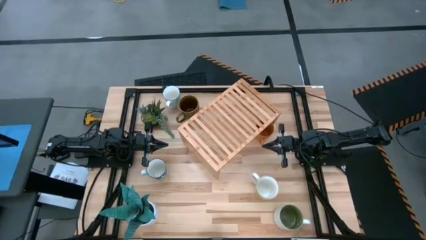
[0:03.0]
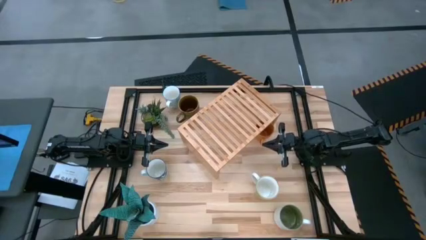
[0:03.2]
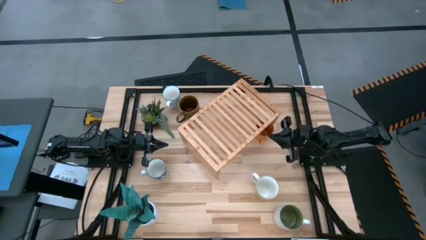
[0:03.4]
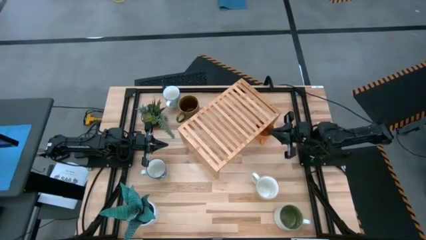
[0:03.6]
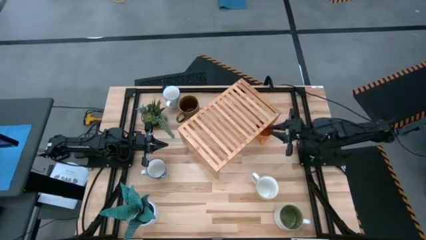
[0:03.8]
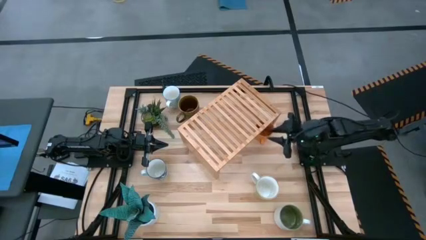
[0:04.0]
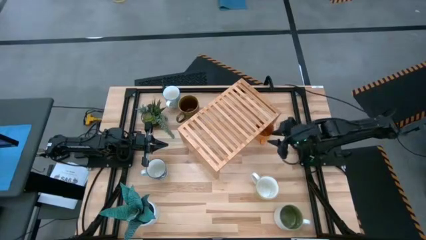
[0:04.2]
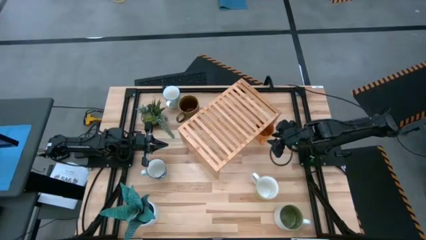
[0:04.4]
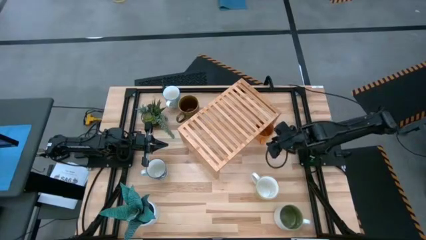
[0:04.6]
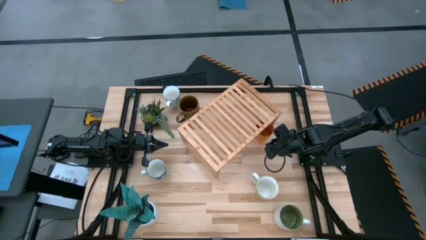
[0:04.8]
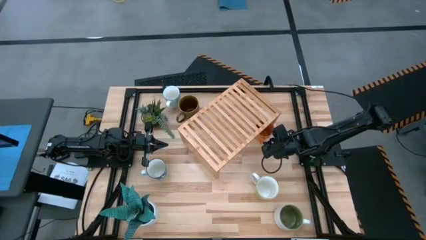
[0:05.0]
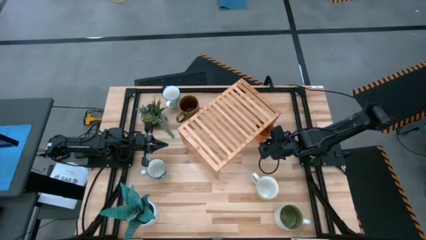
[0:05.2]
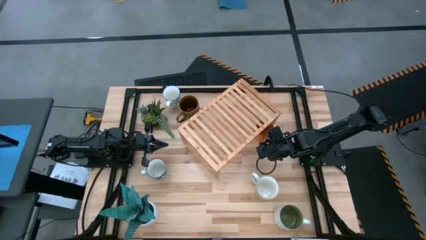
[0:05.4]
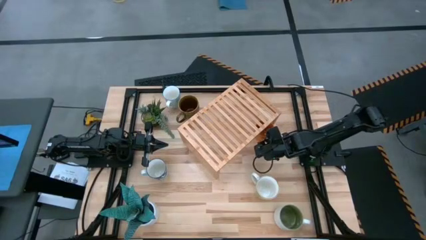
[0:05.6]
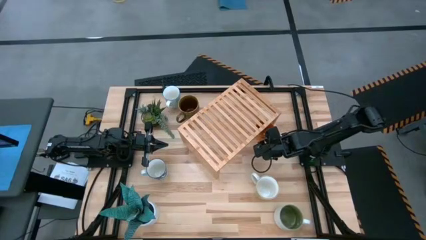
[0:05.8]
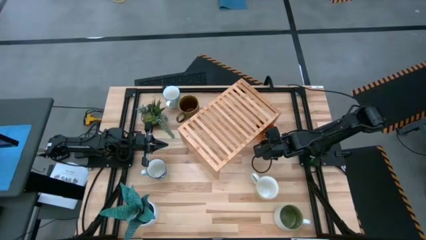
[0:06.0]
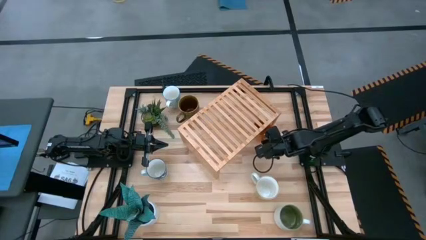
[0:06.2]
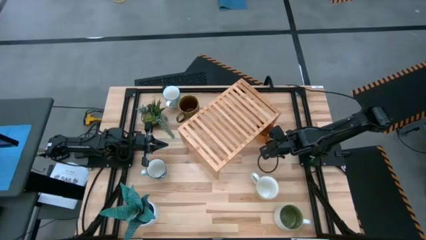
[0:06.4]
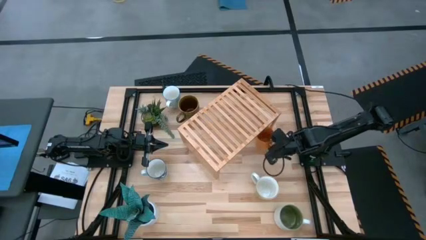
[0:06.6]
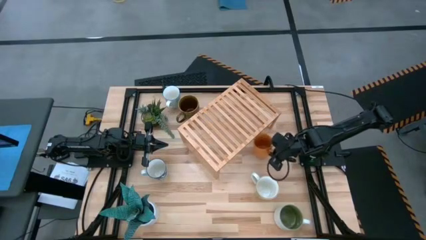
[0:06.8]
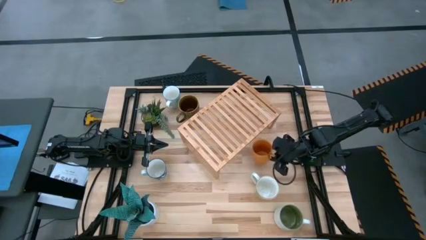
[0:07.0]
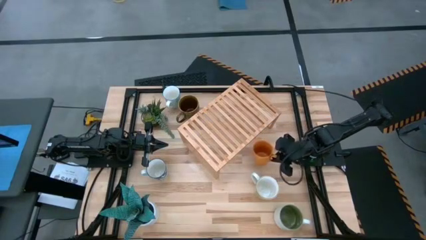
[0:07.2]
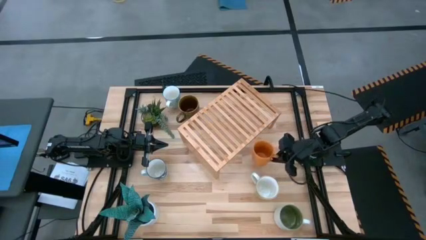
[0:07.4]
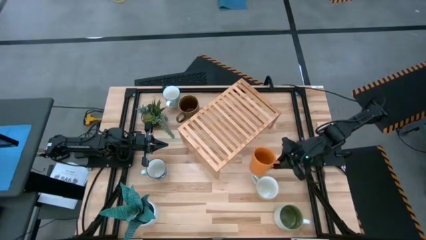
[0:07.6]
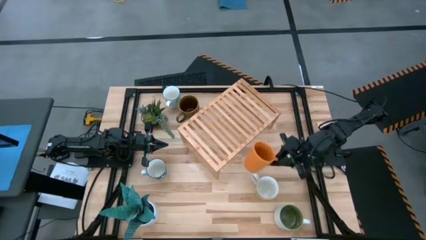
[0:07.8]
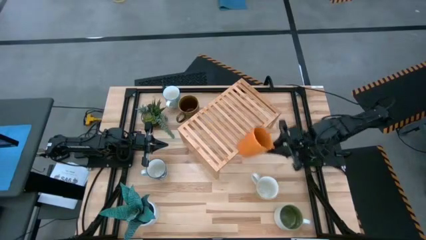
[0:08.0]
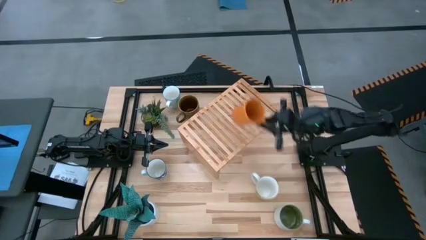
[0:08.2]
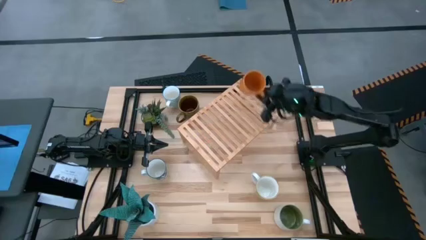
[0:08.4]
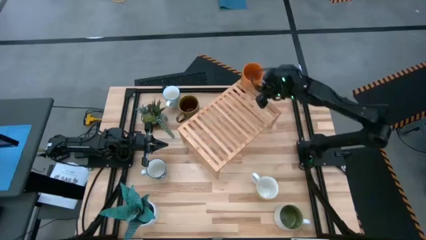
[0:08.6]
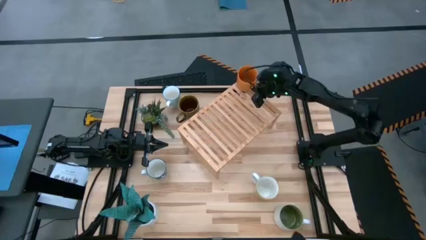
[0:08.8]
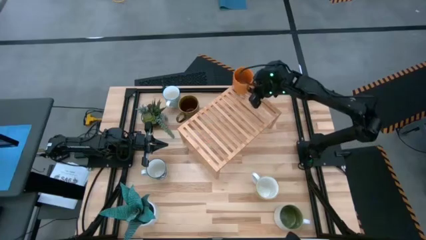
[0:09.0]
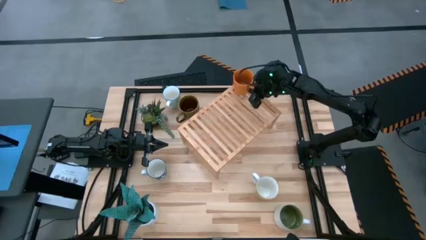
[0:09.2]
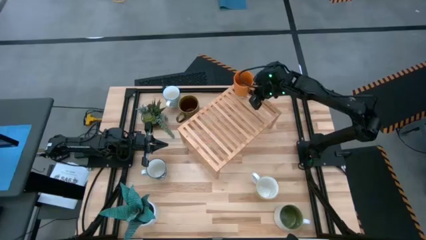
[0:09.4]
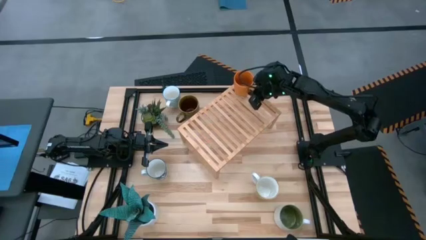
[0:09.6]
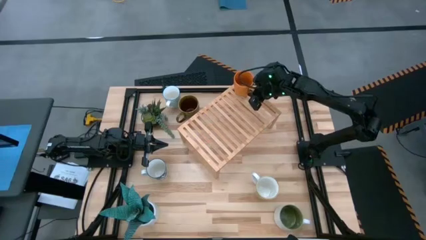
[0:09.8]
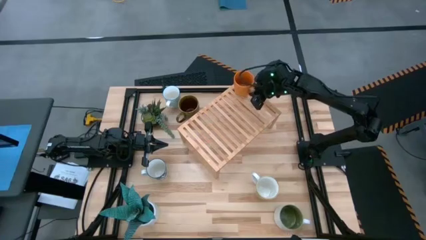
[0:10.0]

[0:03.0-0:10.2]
Task: Place coffee mugs
Put the orange mug on the shelf

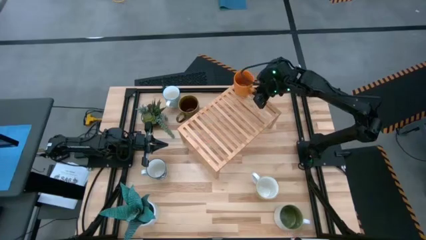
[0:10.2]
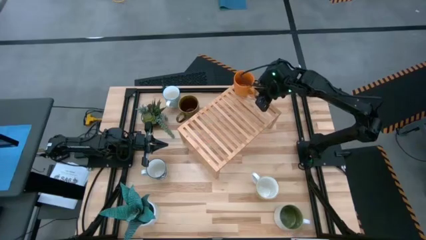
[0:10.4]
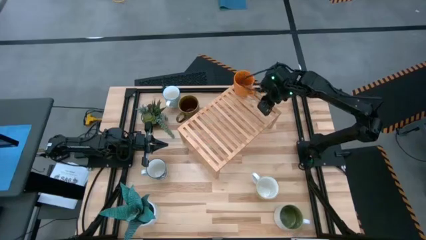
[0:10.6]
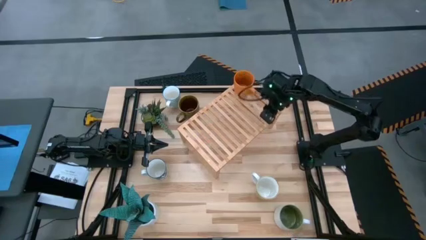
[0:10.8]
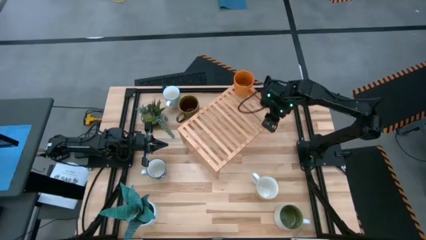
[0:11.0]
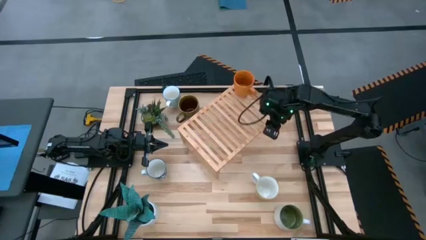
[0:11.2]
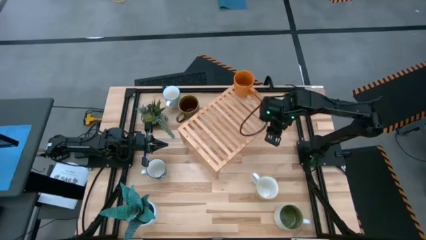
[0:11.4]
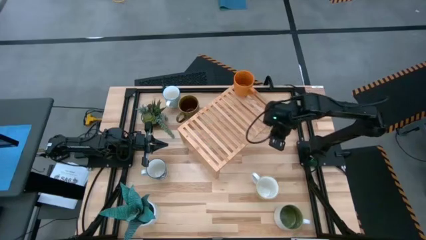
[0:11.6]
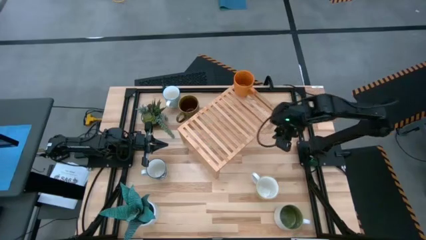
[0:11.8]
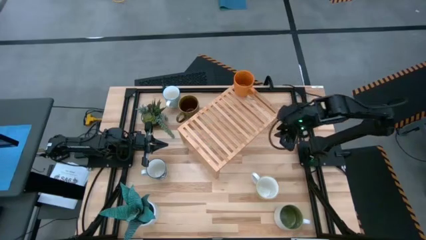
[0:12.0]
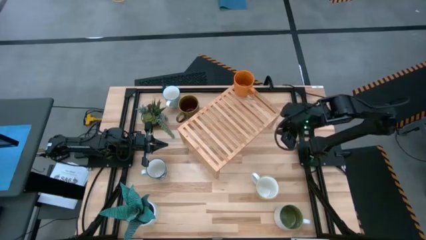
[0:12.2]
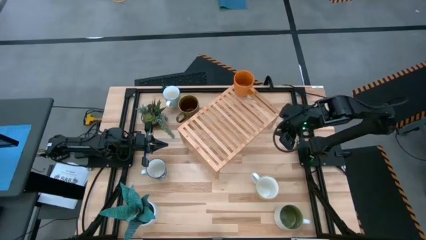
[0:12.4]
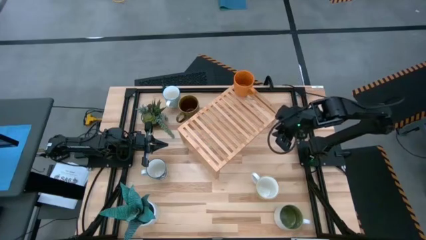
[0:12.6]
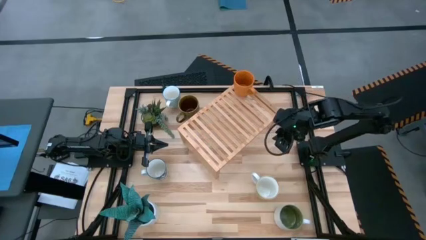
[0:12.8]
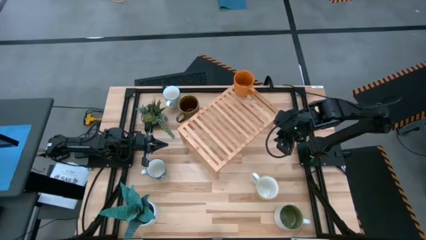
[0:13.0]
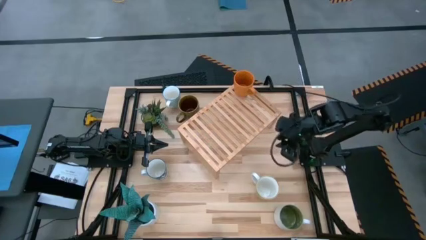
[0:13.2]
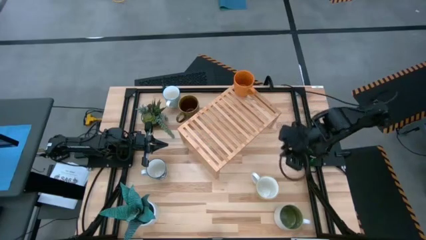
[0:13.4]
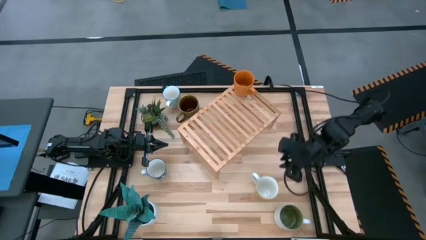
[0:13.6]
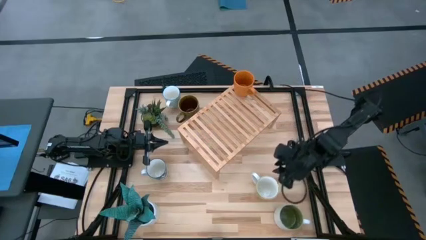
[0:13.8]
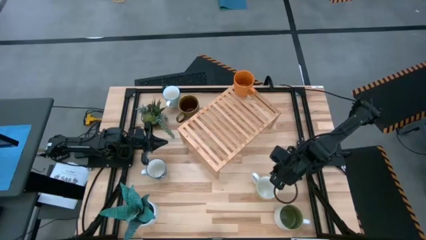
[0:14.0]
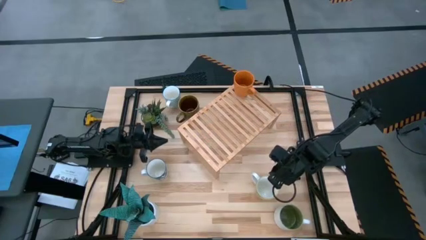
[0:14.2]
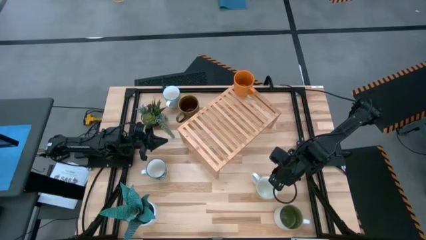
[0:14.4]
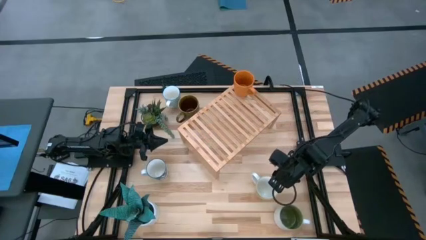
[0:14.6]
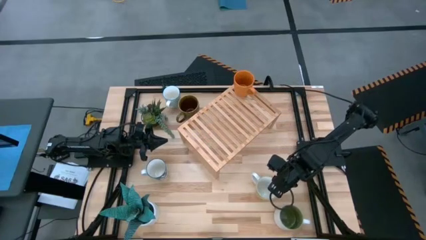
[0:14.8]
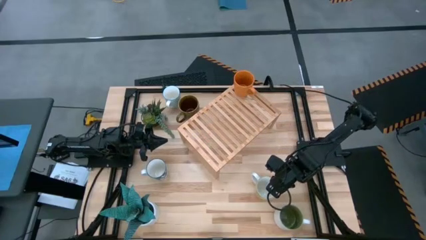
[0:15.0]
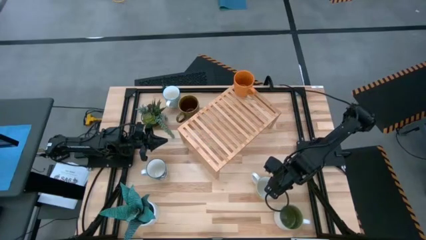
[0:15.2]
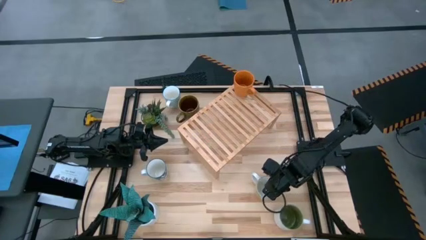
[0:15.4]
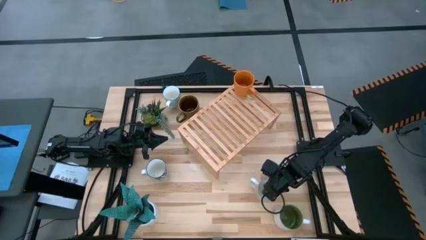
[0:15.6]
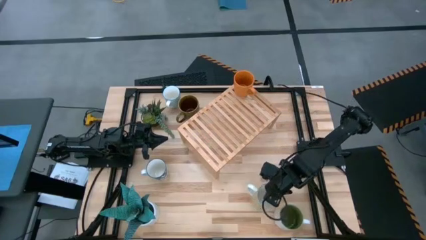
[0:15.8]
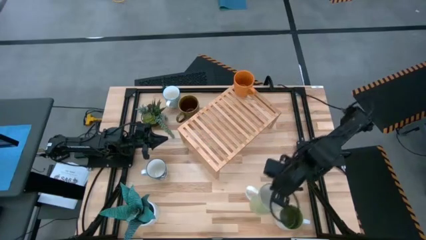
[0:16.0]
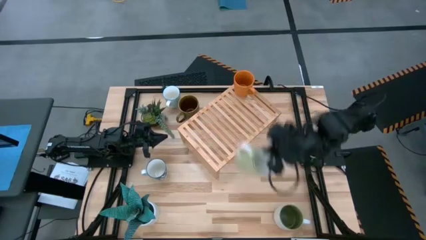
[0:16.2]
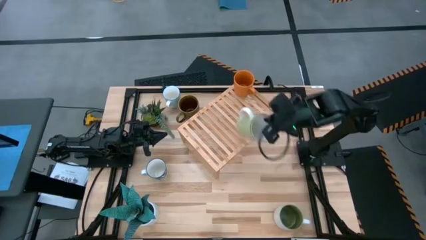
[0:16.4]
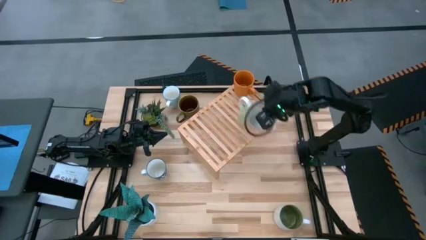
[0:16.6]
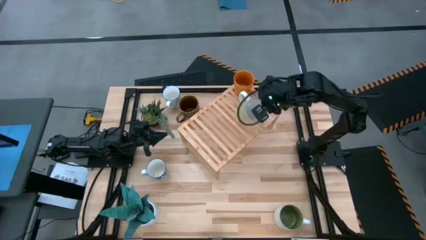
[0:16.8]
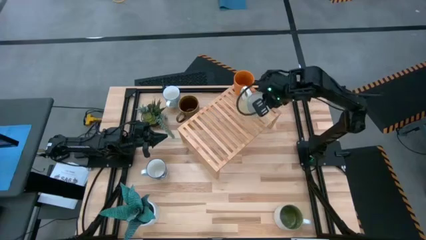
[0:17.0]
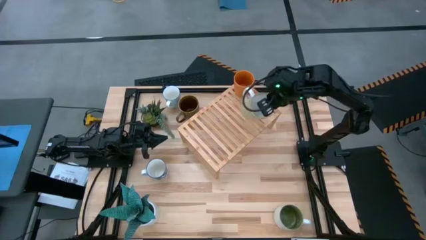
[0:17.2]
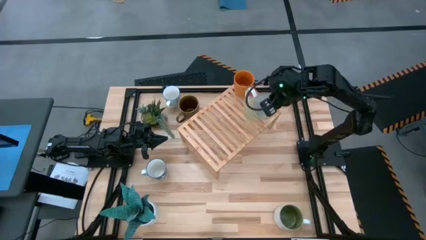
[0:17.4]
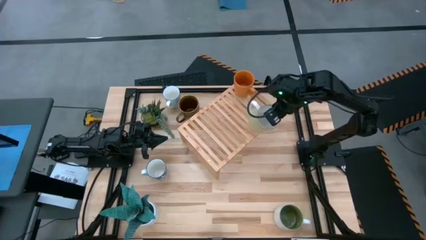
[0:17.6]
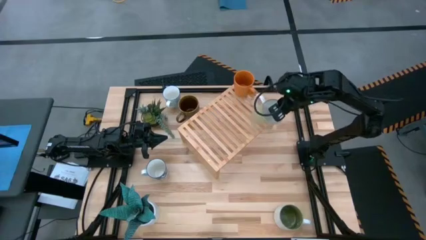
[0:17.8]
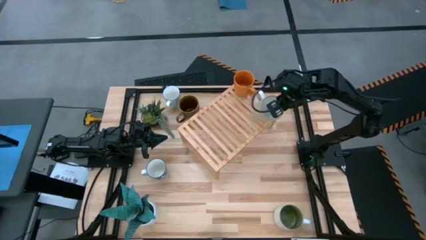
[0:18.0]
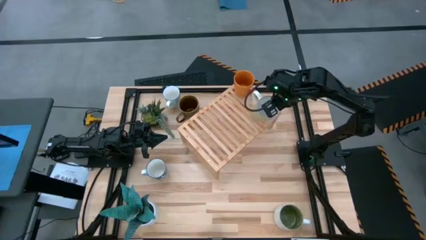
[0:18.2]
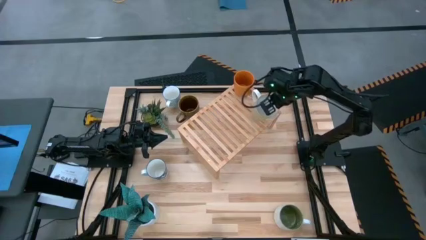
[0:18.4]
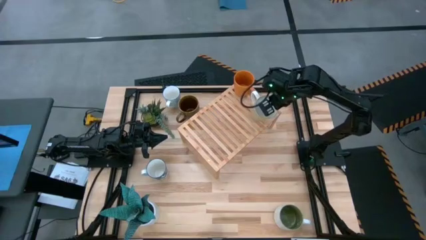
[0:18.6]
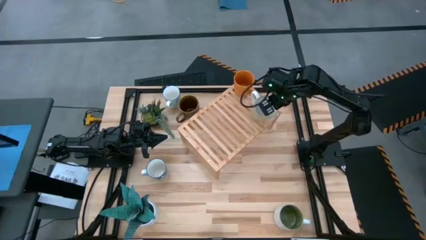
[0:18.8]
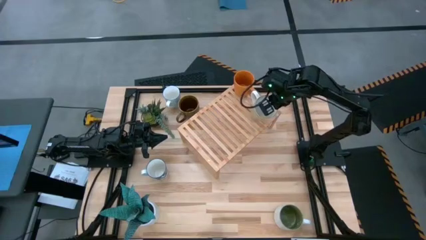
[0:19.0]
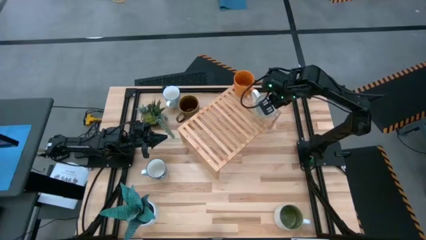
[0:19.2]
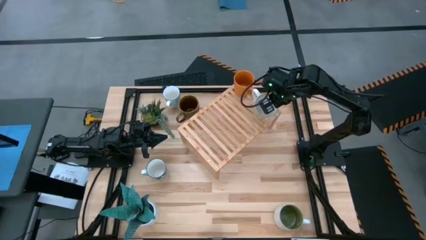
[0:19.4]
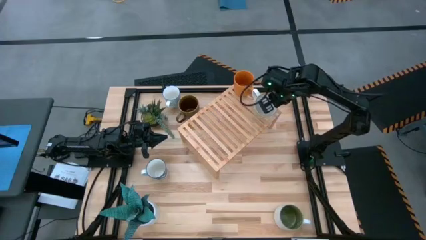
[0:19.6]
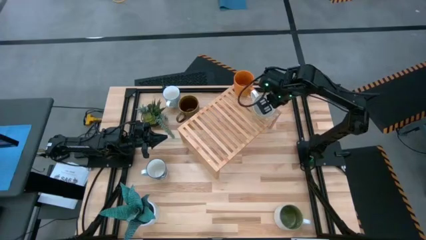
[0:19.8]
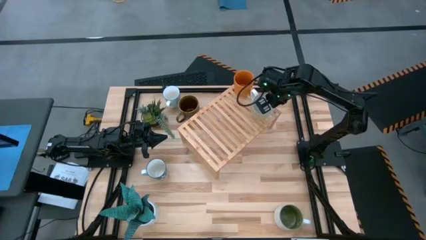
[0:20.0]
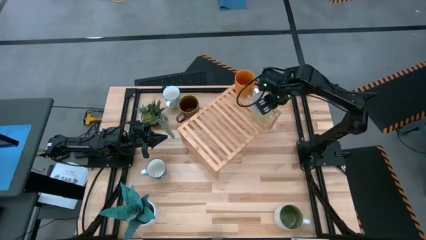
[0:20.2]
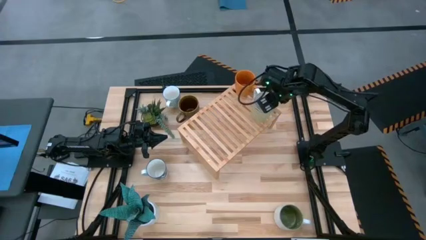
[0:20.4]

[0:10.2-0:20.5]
Put the green mug on the shelf
